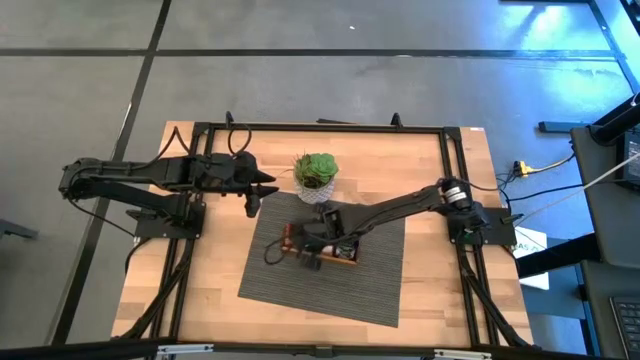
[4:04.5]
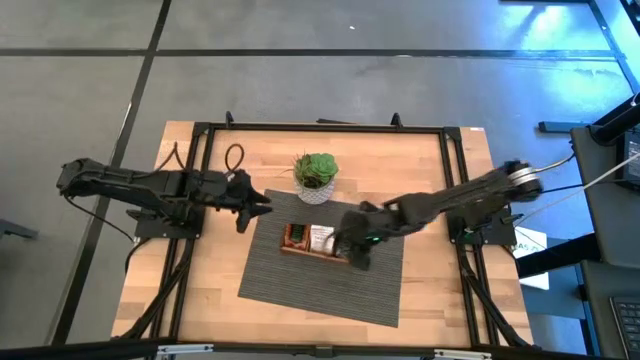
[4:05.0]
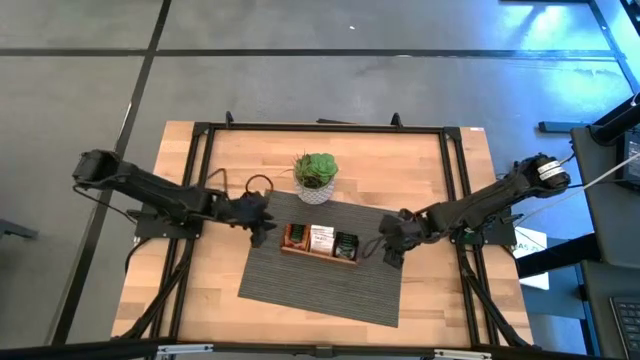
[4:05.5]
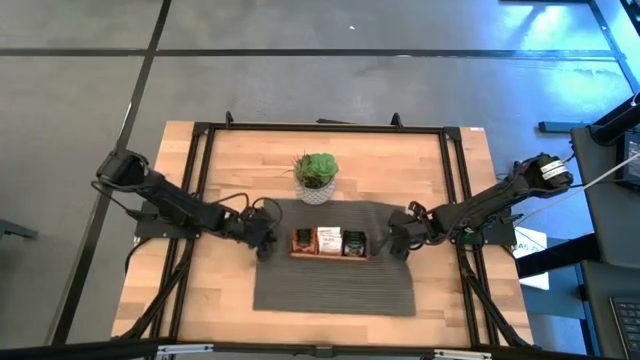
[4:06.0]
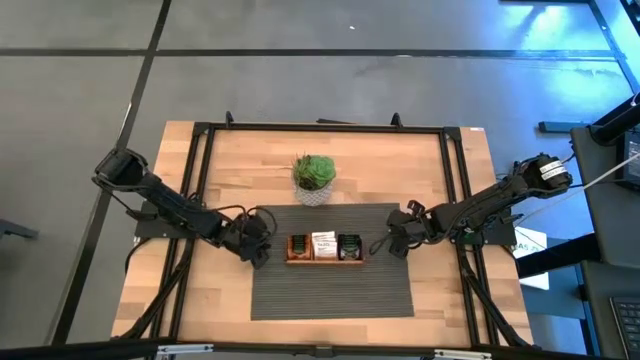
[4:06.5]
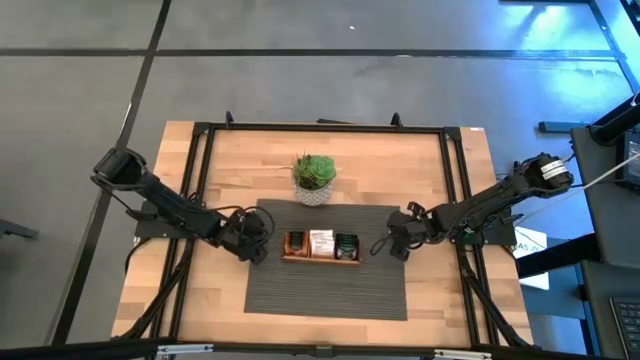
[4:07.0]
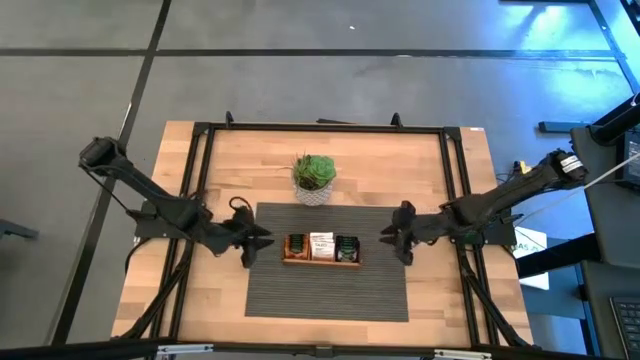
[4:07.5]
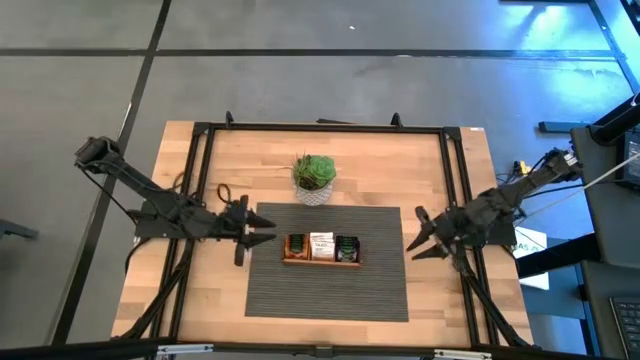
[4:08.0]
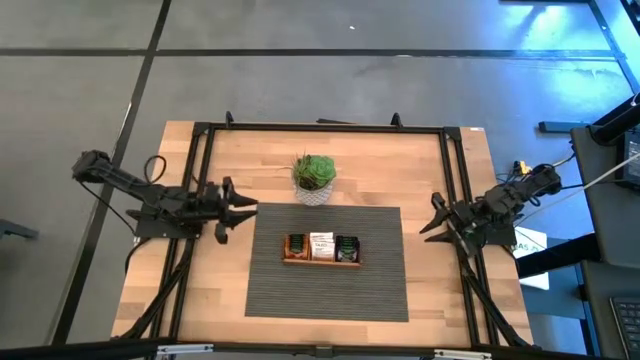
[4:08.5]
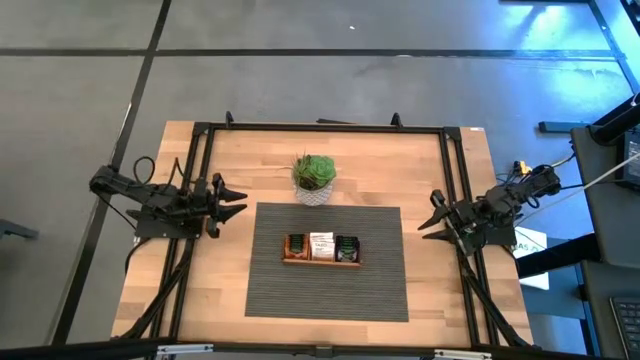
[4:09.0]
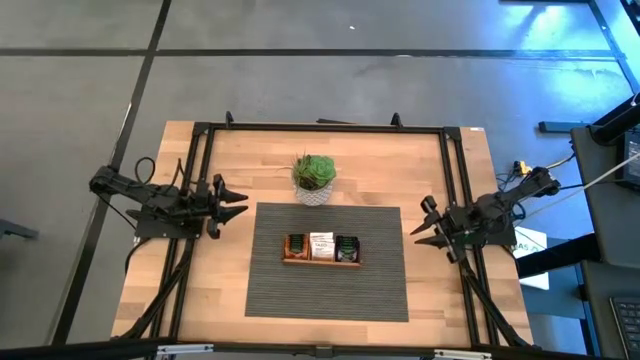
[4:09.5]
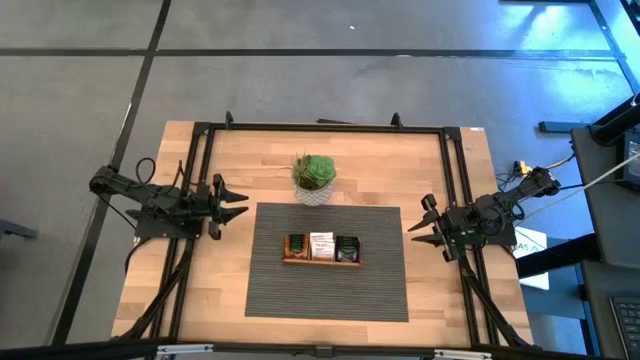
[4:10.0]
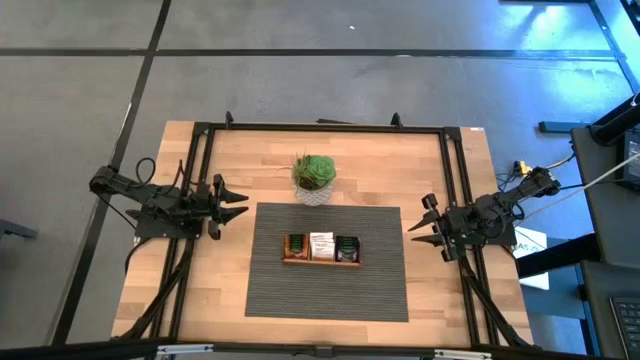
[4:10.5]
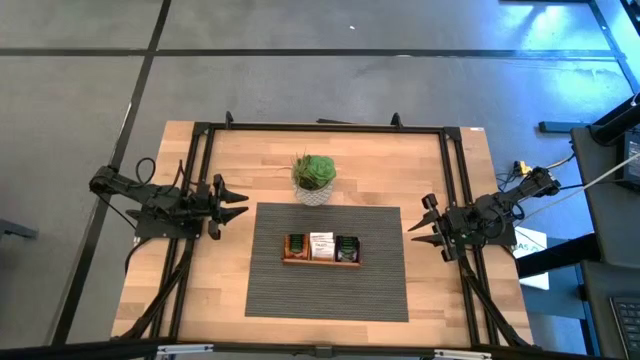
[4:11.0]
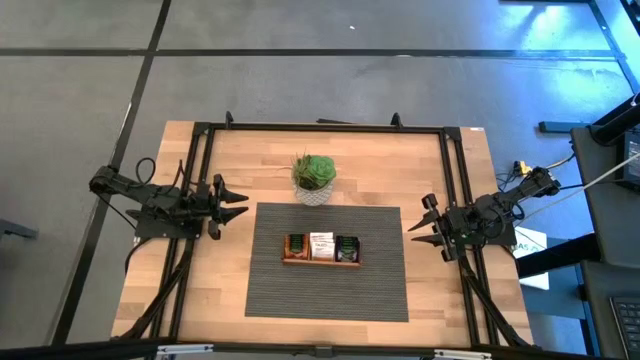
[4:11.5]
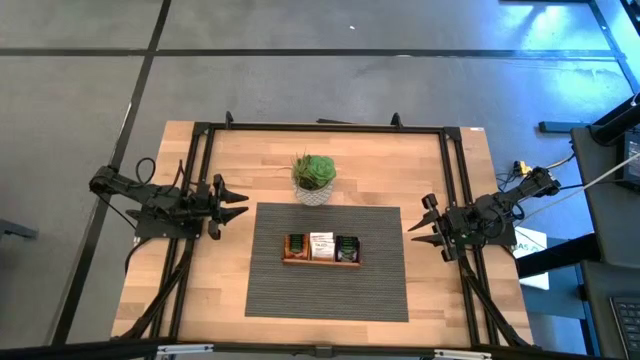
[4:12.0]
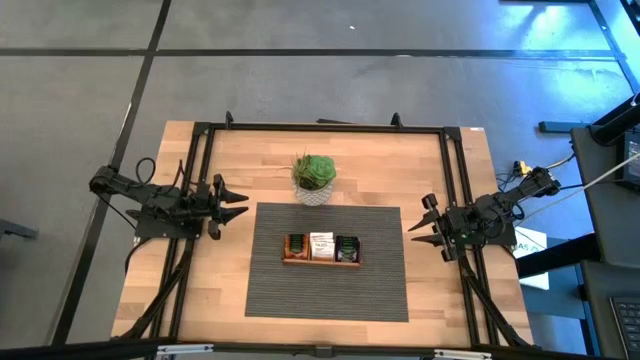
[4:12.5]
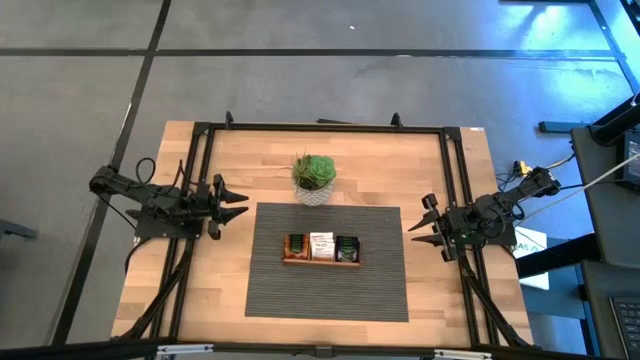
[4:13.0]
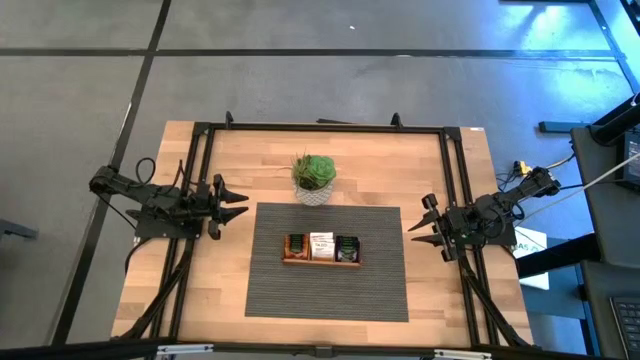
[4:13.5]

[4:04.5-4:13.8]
Task: Pick & Place Tea
Return to Home Position
